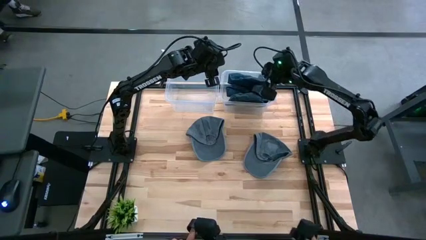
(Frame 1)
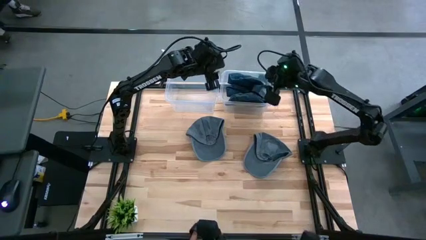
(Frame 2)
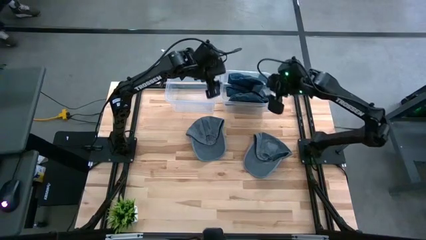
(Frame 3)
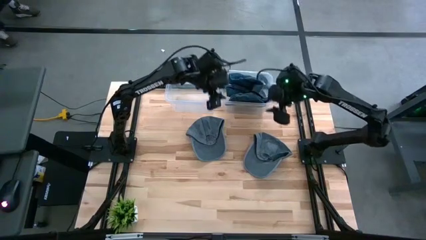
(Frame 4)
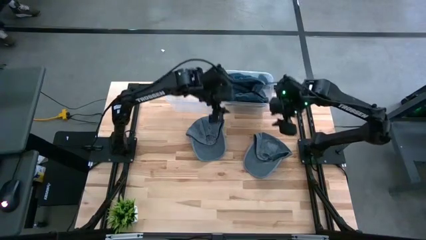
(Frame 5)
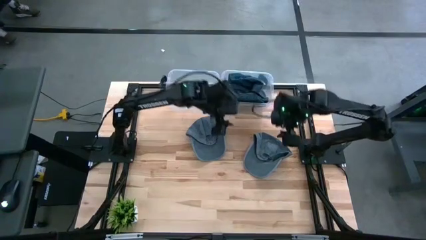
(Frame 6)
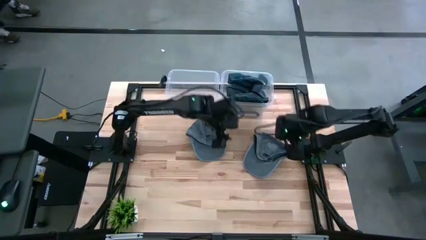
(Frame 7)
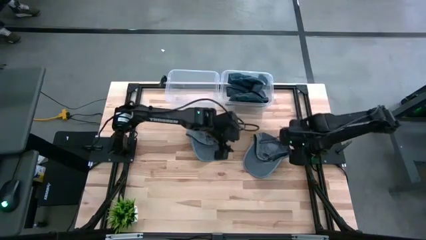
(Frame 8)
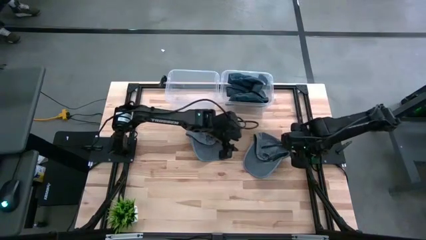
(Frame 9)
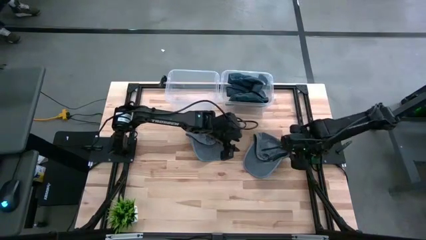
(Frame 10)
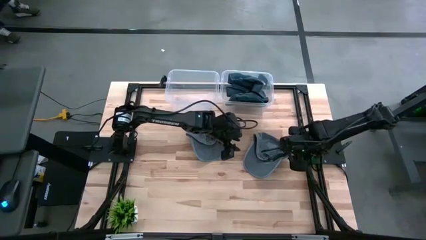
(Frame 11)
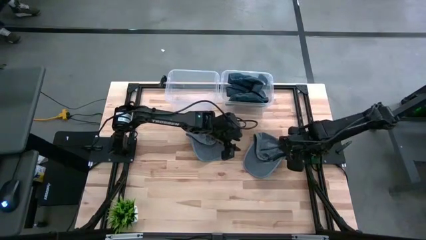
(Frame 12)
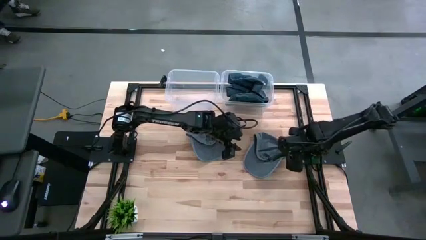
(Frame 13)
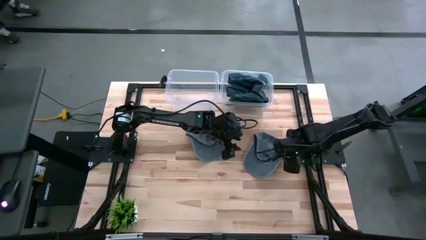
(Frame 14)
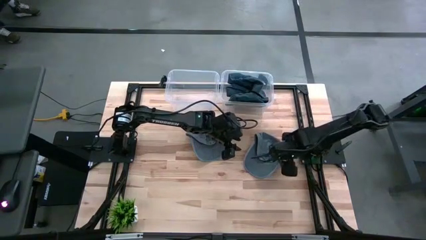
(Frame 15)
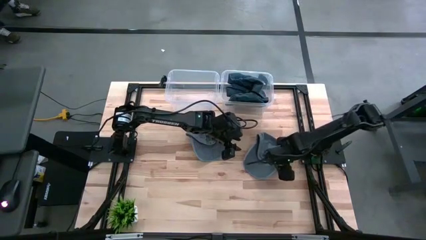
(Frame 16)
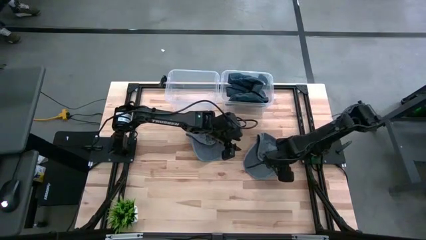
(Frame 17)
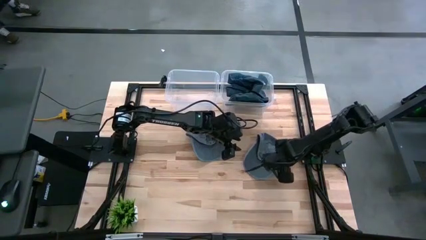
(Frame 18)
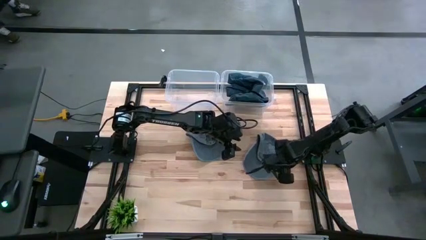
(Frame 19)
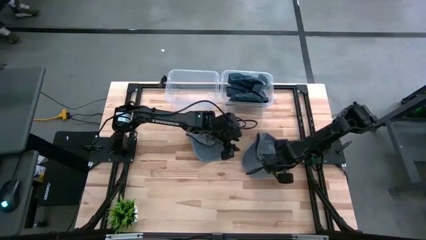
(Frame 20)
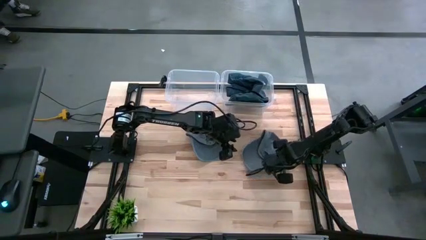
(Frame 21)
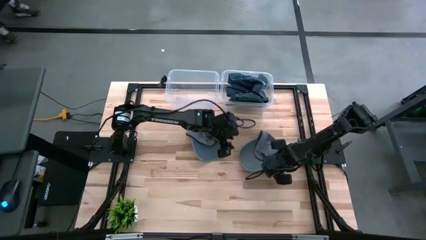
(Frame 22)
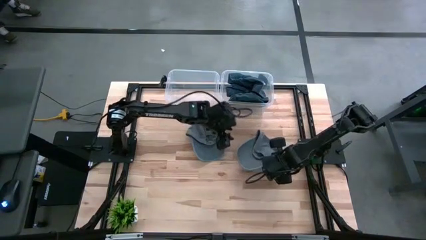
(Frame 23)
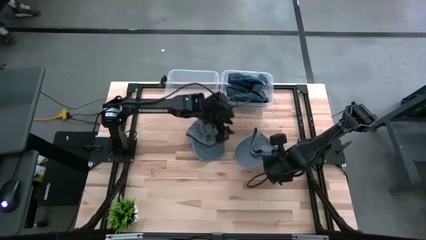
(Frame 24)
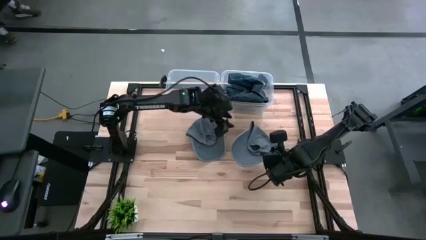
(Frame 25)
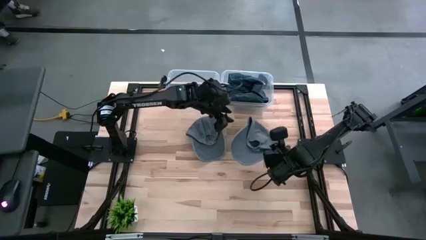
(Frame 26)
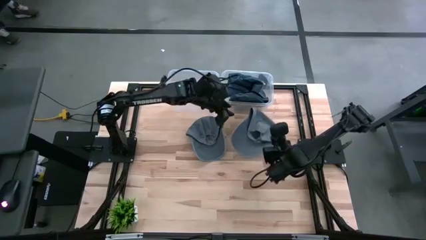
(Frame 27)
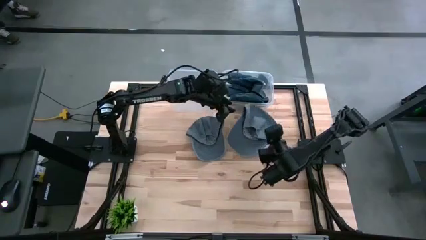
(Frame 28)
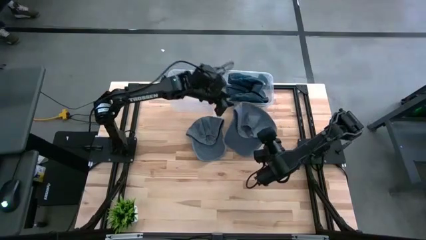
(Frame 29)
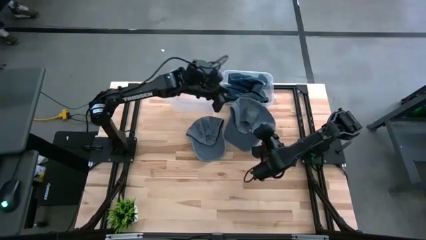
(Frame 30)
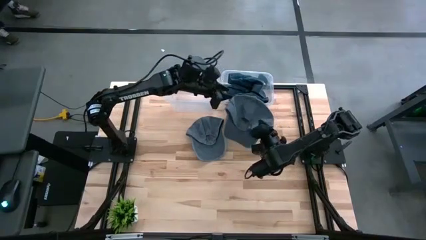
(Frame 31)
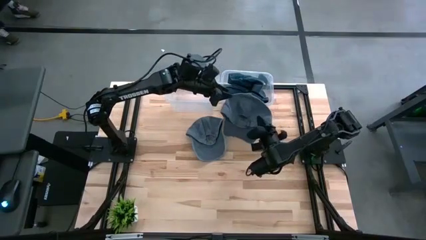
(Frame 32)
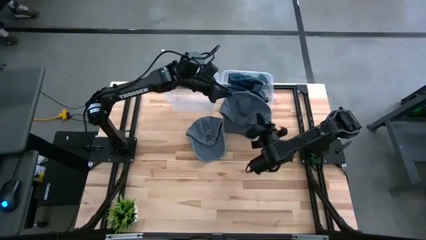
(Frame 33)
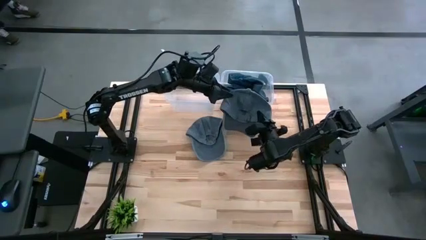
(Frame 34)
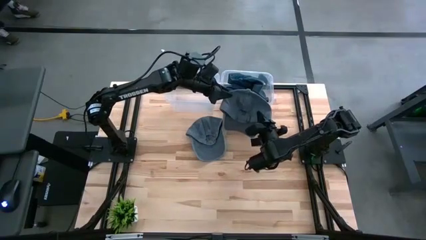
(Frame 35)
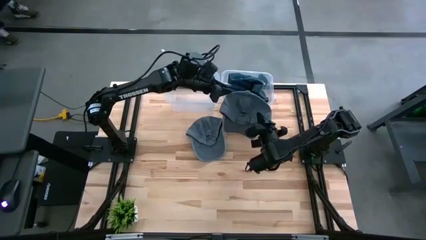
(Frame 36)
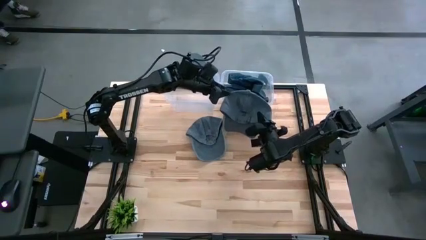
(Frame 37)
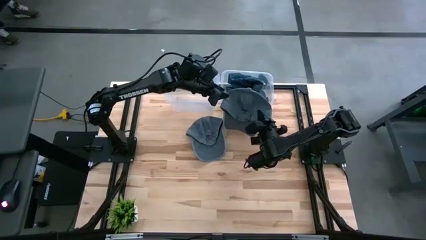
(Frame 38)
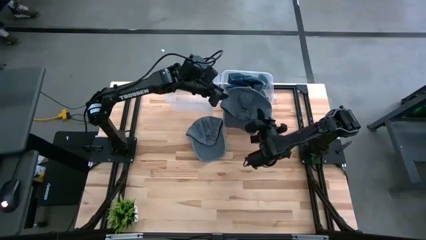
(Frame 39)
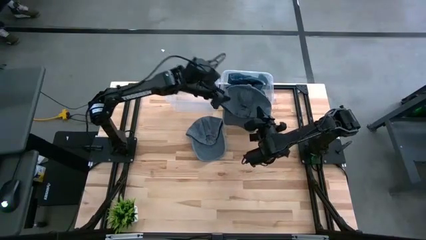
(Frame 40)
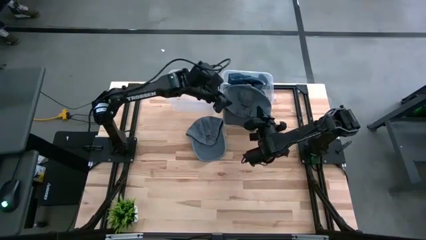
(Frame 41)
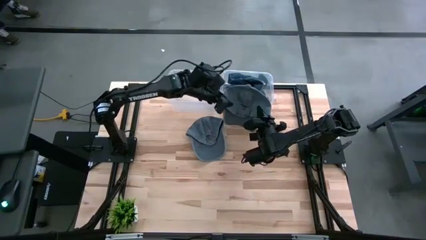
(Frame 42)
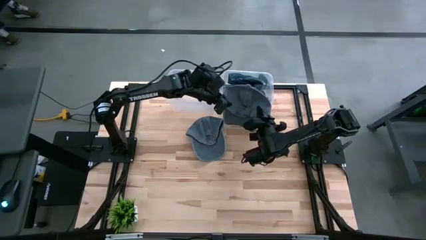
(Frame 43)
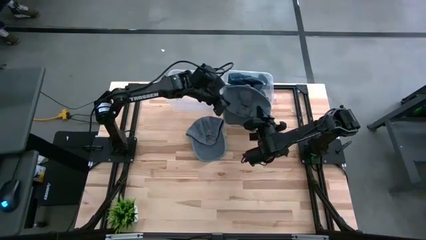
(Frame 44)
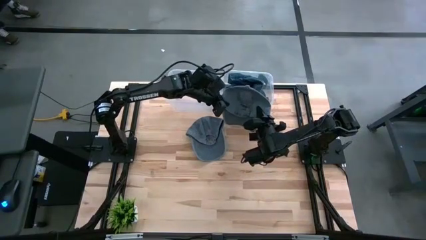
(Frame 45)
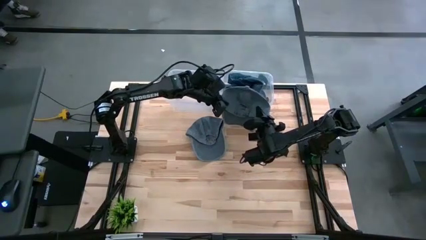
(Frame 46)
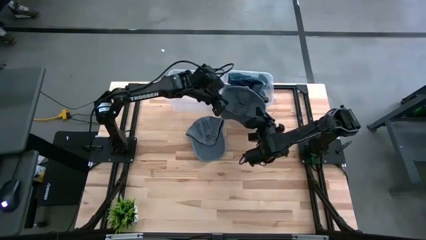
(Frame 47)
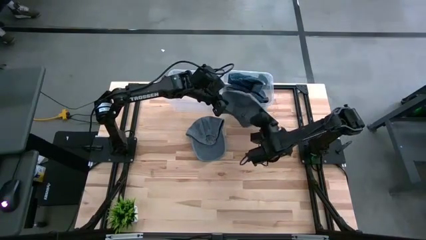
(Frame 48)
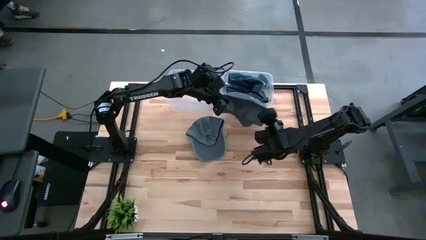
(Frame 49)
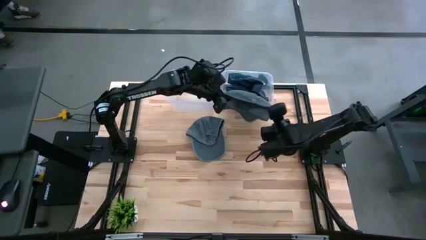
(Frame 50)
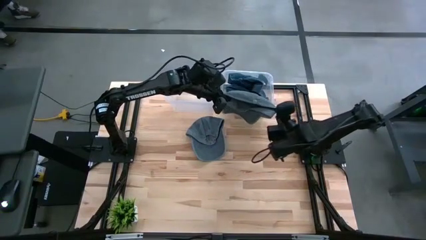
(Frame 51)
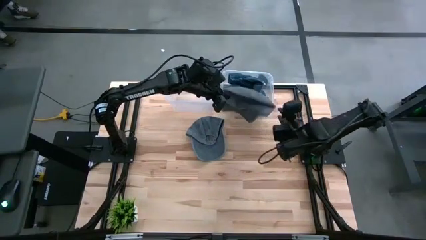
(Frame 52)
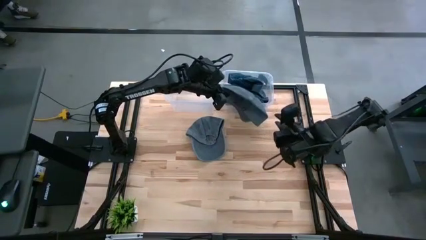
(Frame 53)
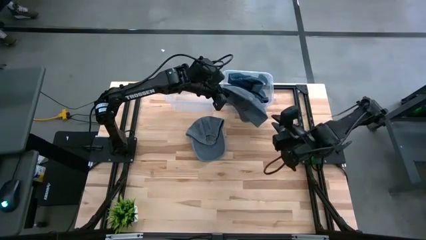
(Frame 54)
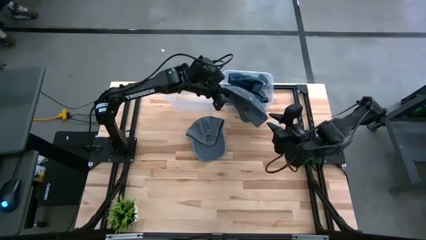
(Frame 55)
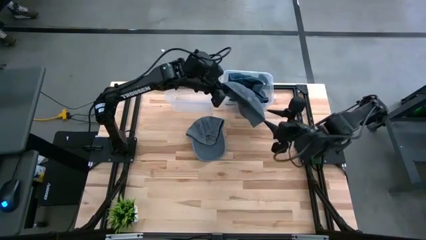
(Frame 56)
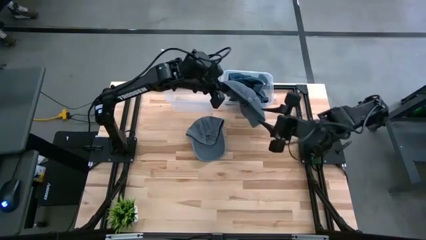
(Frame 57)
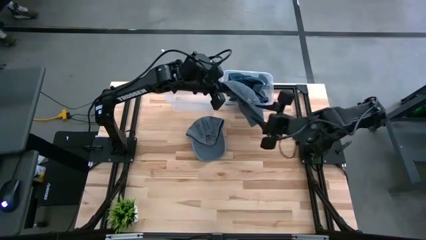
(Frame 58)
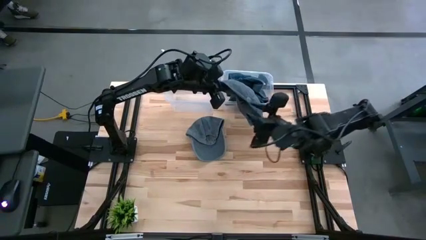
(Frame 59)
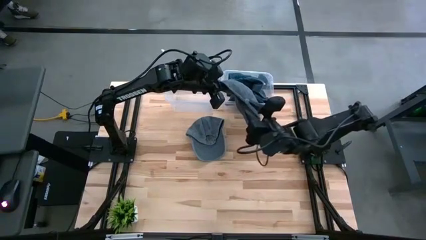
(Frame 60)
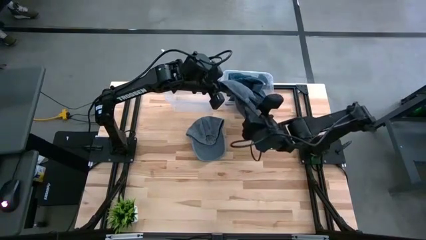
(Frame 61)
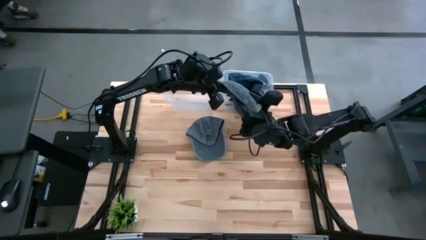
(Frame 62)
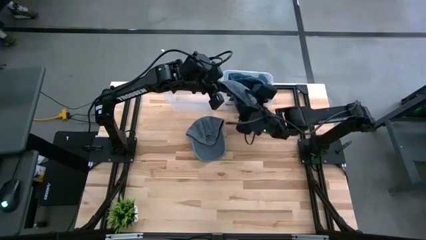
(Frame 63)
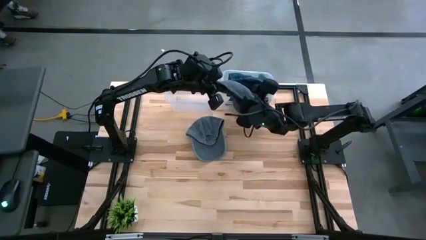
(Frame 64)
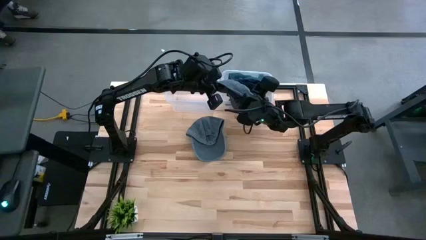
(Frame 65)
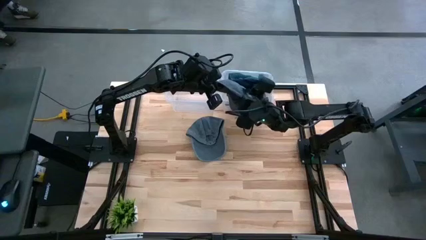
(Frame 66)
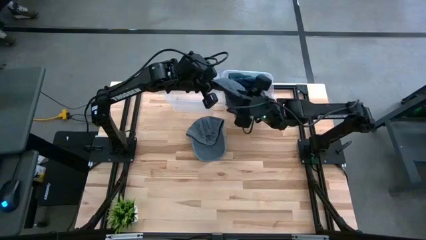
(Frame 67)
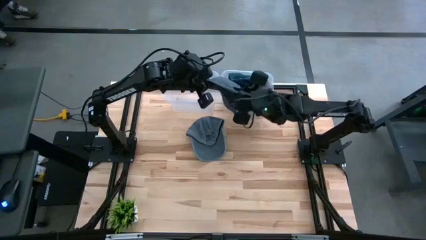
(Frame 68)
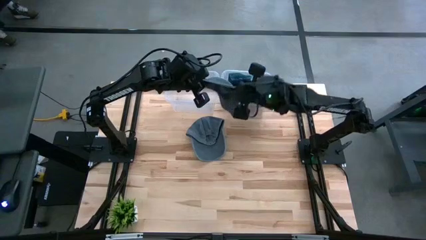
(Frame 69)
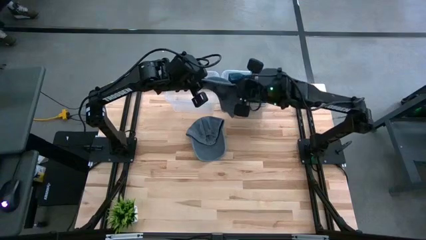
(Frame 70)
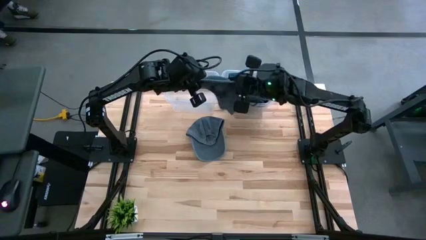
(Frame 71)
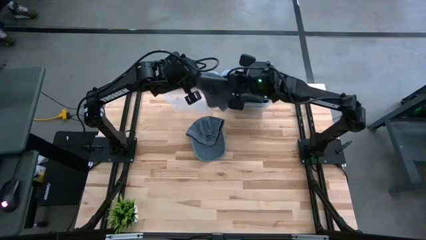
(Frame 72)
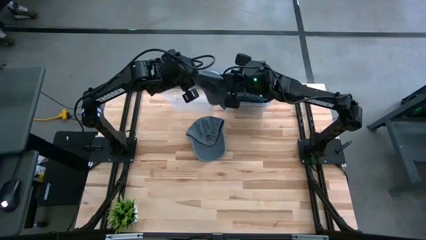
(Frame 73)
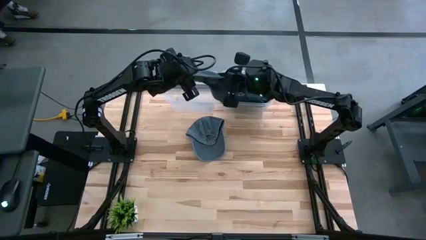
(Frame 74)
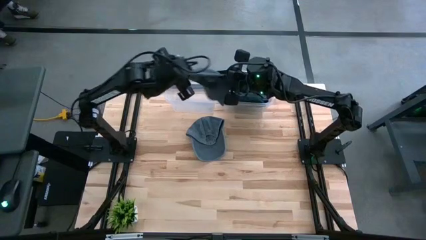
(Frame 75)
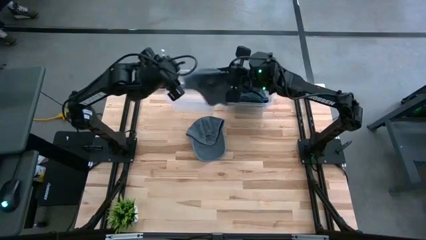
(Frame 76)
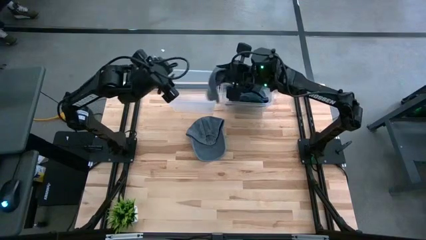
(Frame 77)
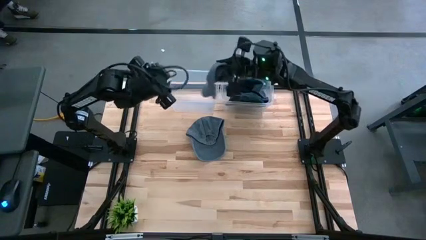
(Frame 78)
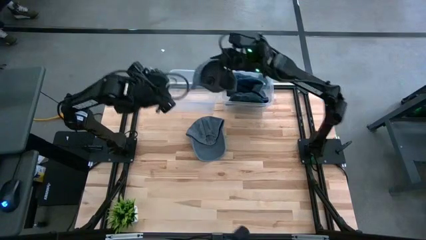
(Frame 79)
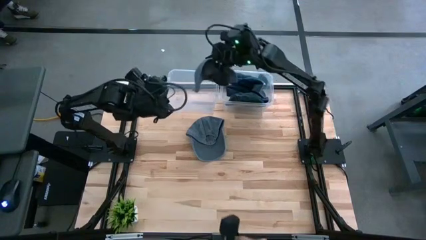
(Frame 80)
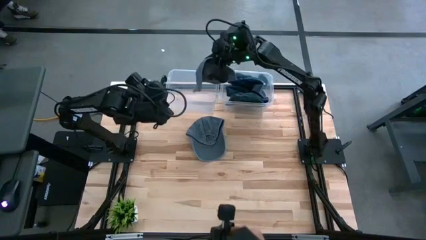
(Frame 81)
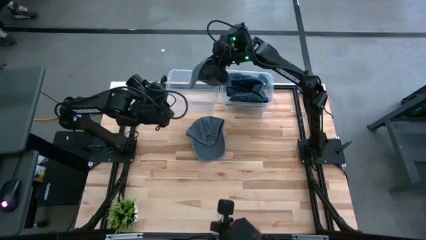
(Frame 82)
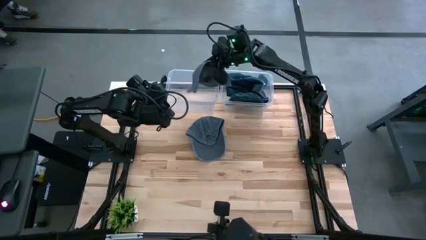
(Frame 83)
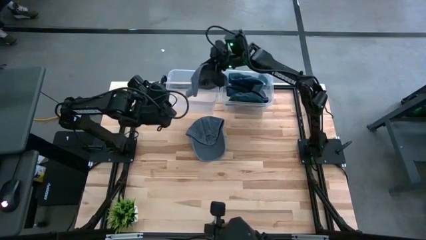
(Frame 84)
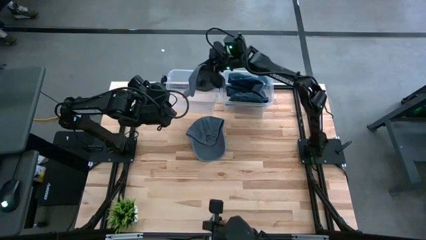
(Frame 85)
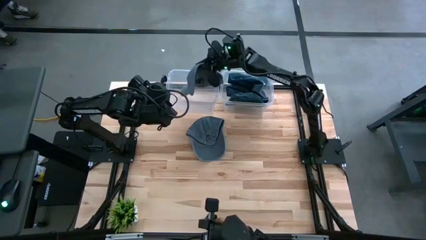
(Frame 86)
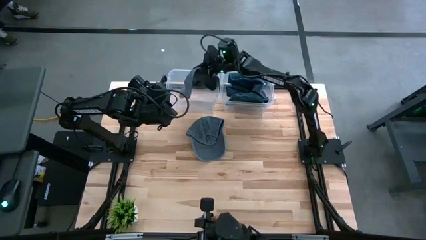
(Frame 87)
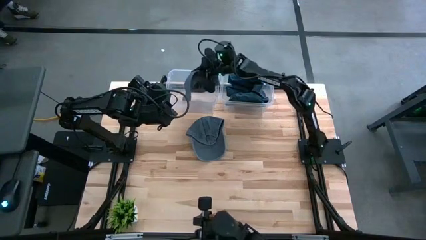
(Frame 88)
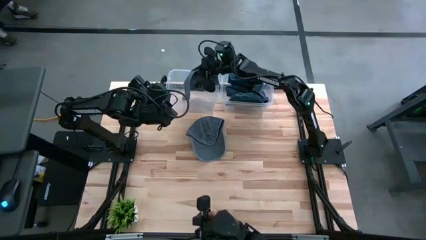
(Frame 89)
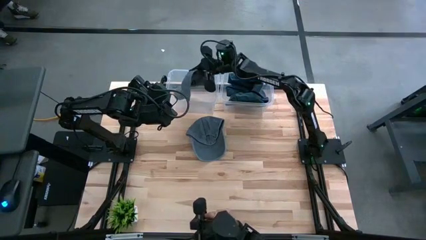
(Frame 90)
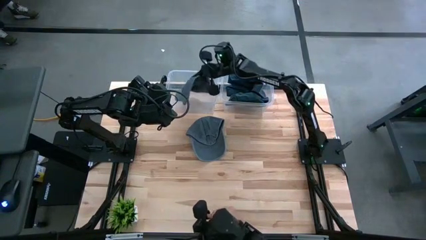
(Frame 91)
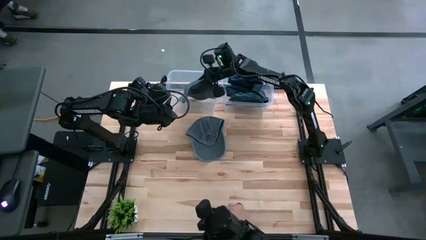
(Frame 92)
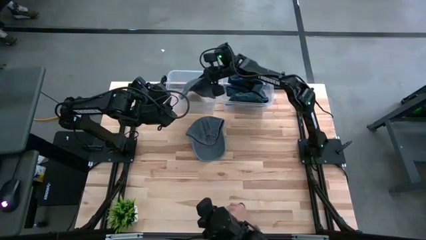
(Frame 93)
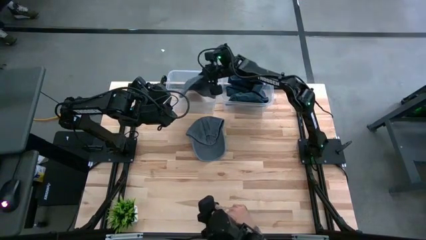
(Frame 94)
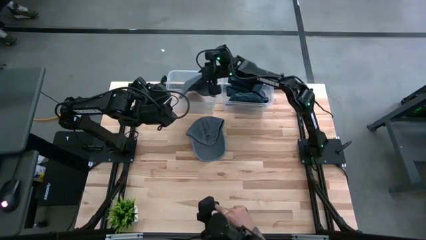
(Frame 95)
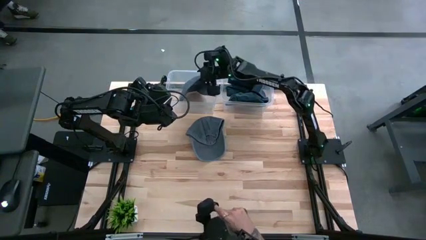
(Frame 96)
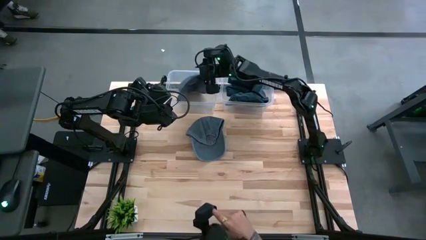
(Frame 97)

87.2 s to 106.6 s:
Task: Pick & Place hat
Put the right gray cap into the left transparent bin
